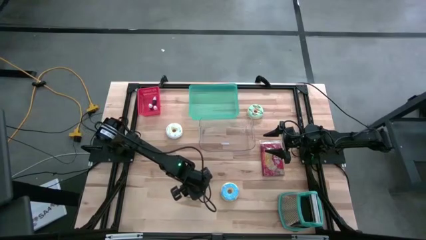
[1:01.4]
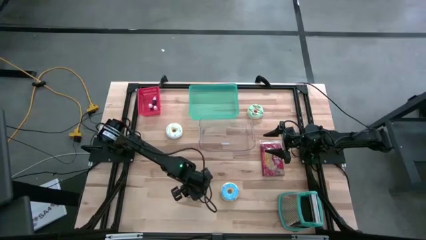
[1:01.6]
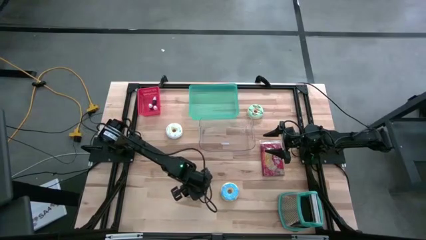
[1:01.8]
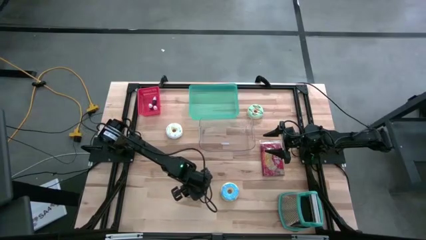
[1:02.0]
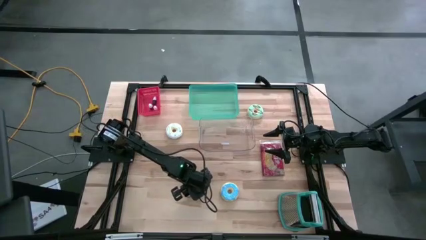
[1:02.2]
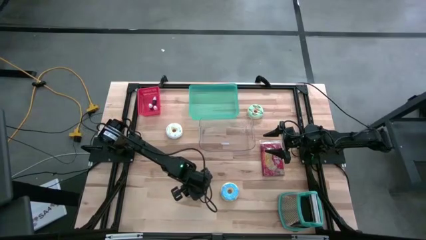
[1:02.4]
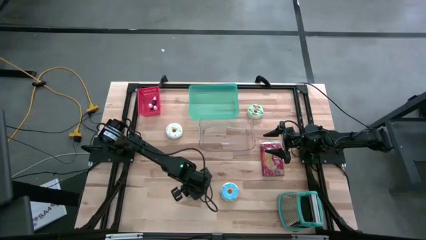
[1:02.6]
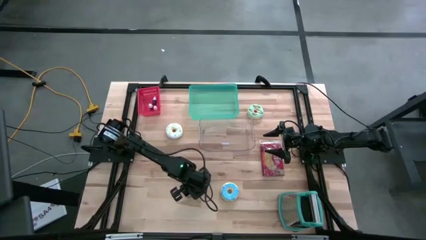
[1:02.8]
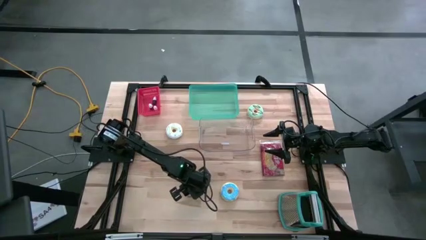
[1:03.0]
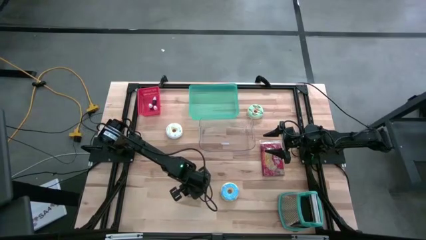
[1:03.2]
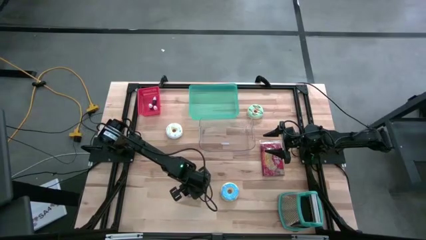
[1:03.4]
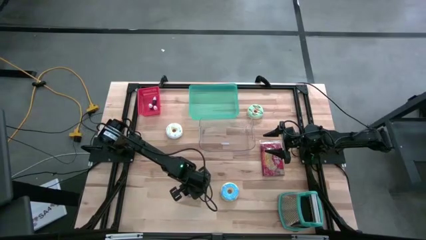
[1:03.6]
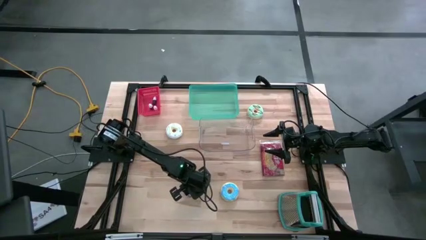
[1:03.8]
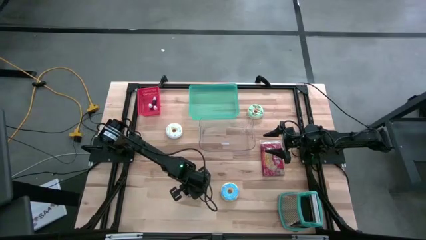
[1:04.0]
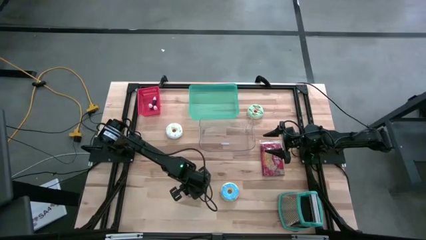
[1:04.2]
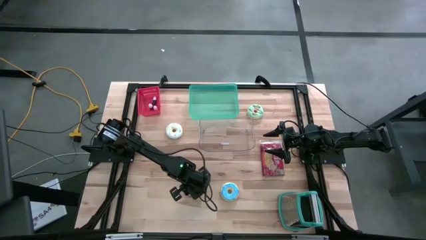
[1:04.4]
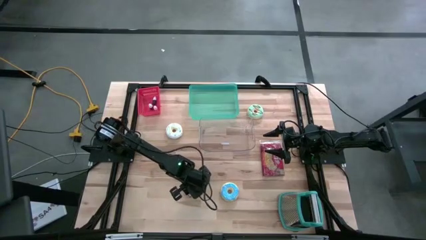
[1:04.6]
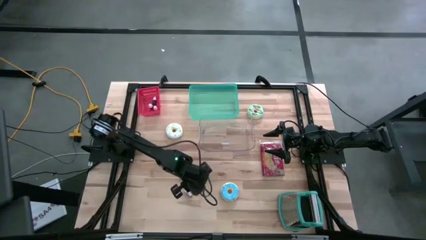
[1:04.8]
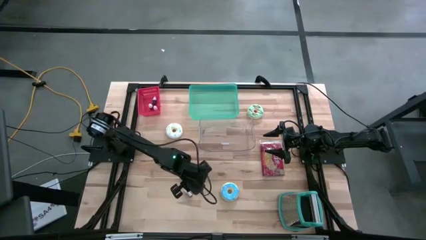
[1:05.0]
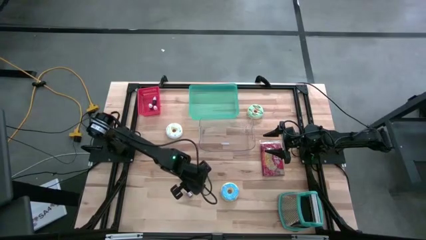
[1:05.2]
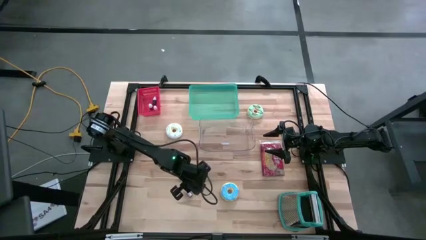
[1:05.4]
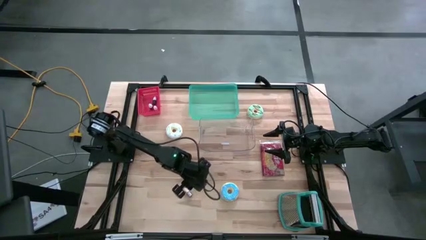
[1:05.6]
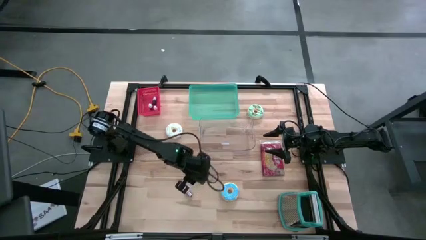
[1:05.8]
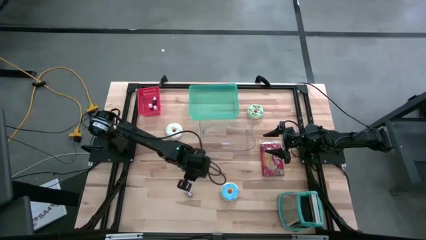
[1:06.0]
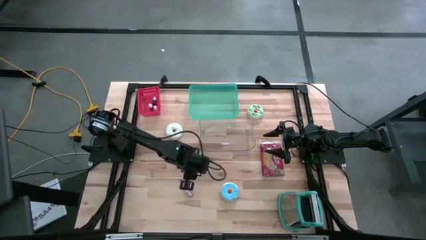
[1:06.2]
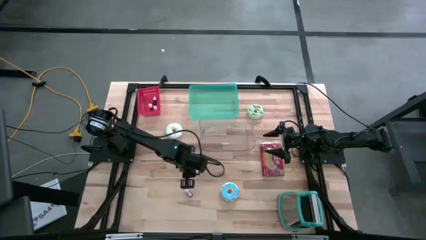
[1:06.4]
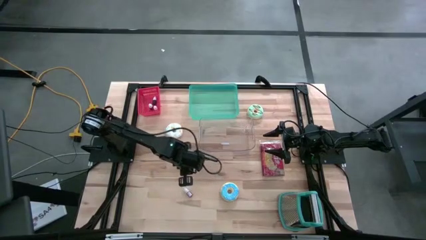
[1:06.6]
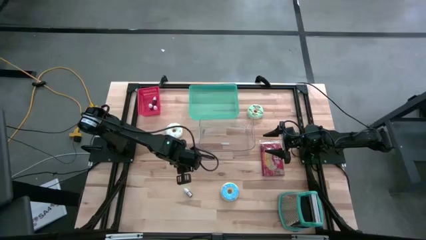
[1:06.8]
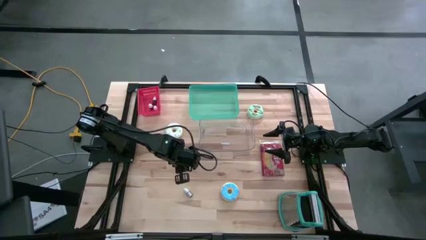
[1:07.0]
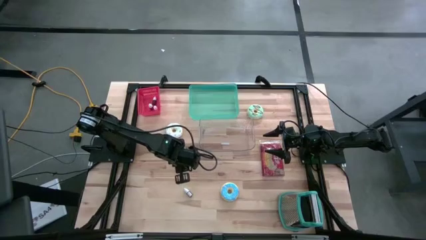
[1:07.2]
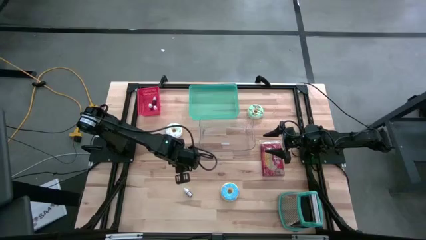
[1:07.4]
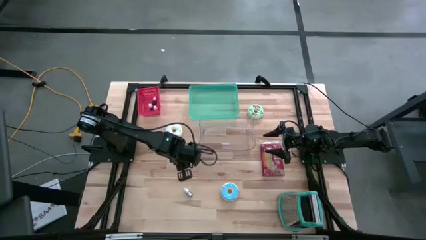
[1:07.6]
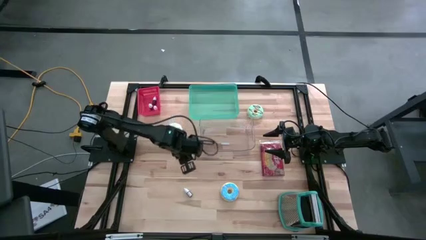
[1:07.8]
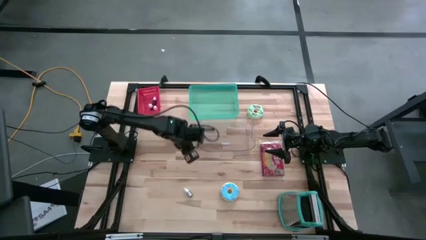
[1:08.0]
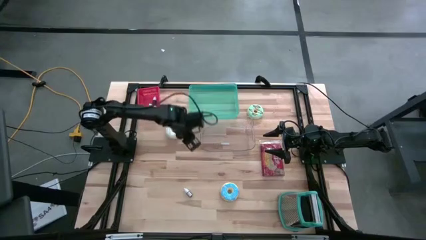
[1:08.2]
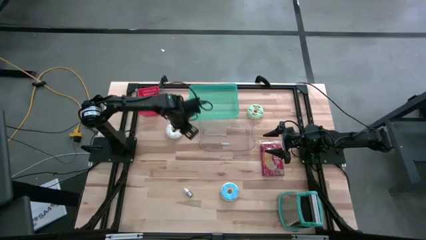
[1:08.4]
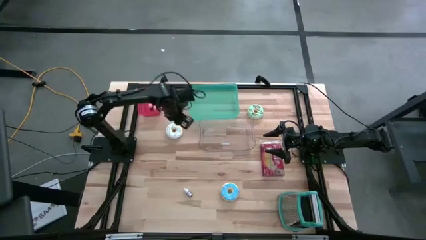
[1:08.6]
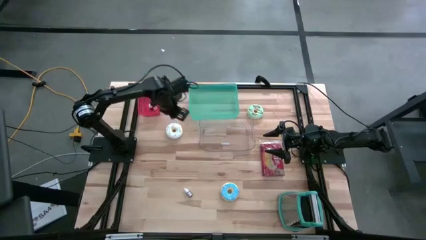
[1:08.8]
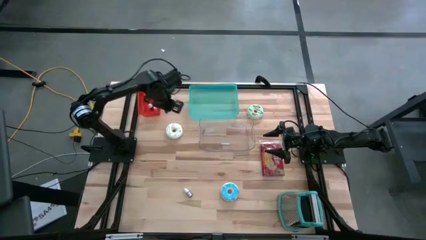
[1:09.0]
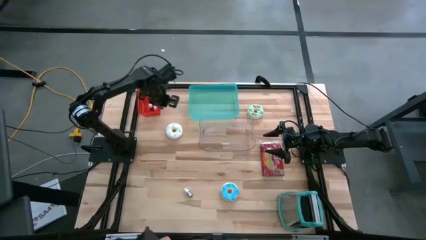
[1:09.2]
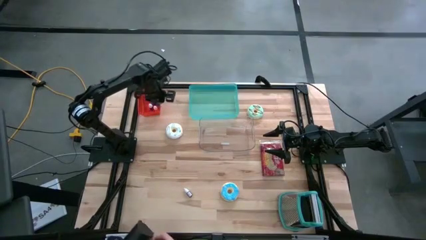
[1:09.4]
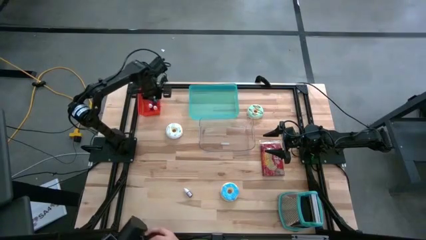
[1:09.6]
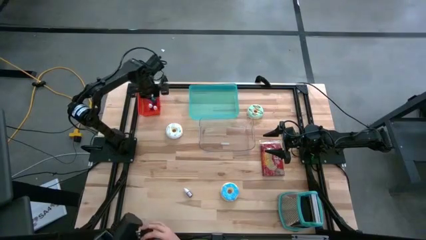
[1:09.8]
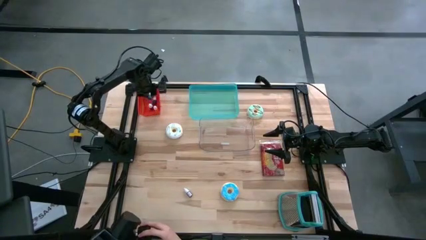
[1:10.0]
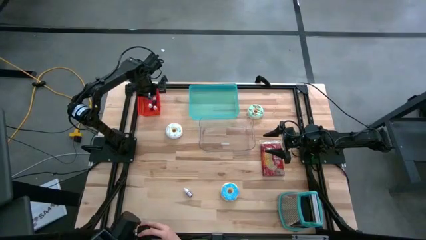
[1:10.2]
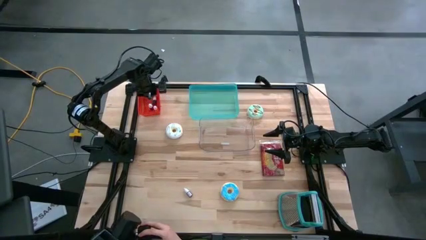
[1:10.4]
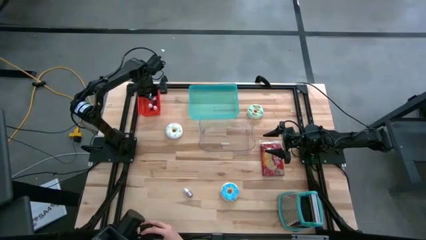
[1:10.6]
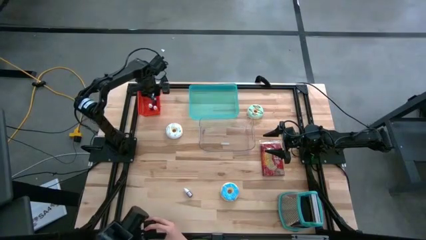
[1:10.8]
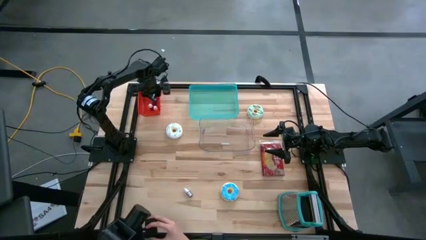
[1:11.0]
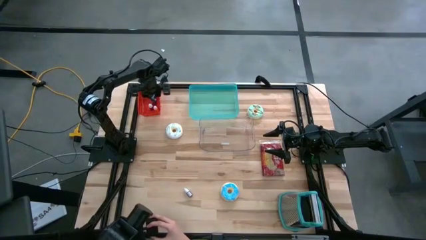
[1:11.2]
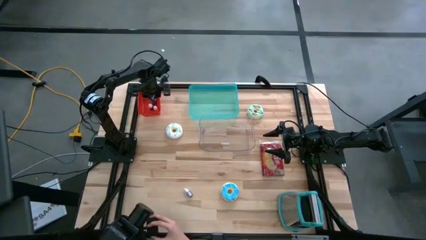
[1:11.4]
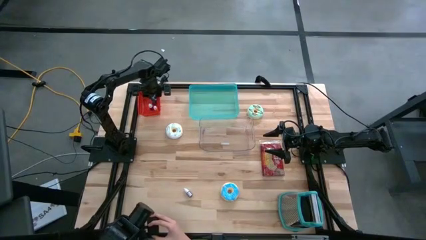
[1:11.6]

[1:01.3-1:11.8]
Put the blue food coloring bottle into the red bin
